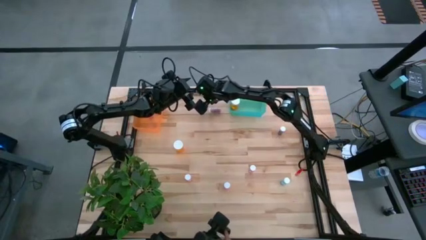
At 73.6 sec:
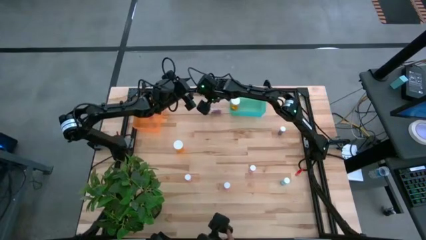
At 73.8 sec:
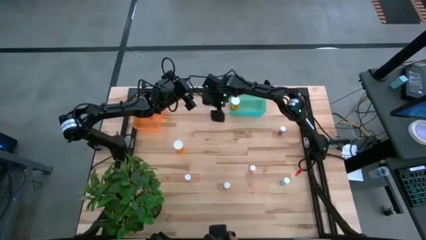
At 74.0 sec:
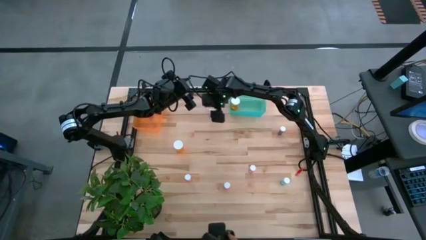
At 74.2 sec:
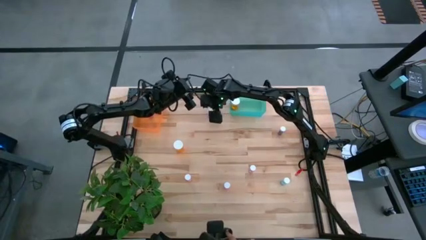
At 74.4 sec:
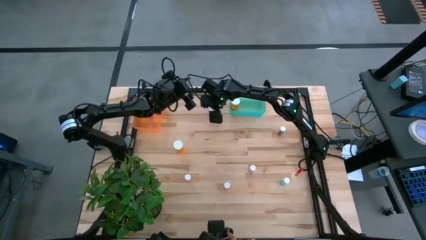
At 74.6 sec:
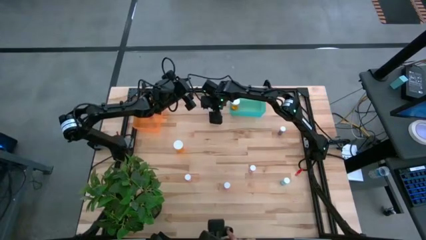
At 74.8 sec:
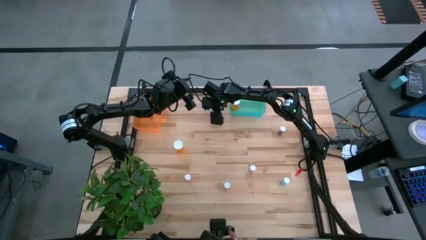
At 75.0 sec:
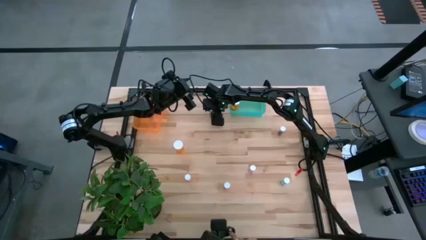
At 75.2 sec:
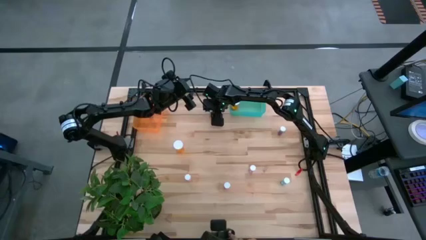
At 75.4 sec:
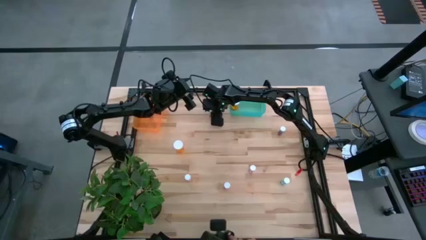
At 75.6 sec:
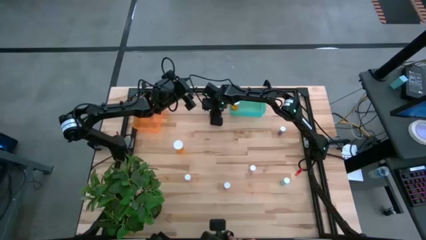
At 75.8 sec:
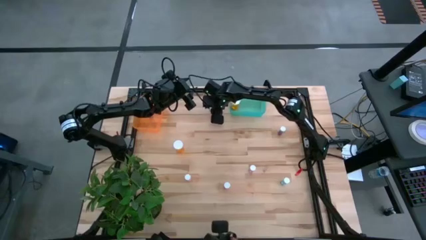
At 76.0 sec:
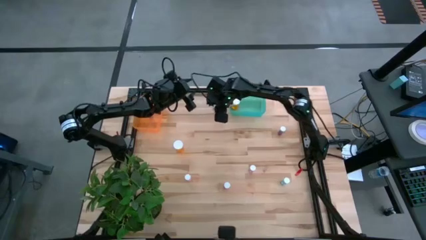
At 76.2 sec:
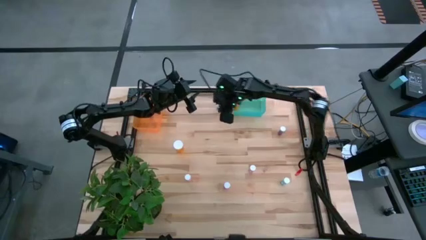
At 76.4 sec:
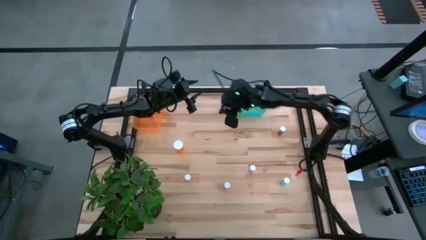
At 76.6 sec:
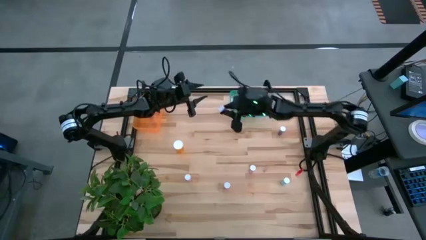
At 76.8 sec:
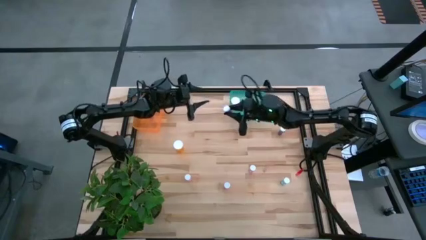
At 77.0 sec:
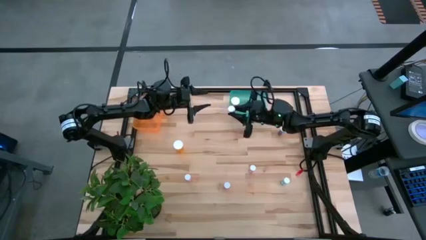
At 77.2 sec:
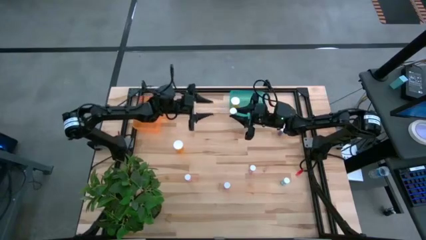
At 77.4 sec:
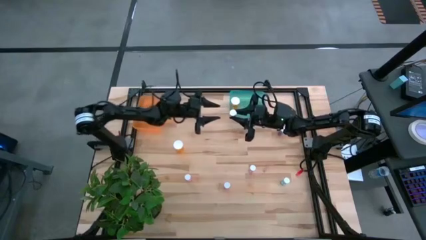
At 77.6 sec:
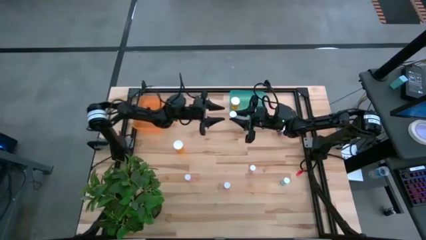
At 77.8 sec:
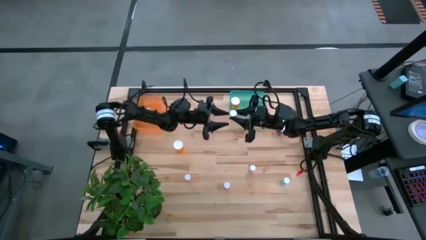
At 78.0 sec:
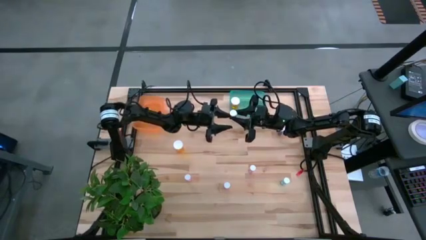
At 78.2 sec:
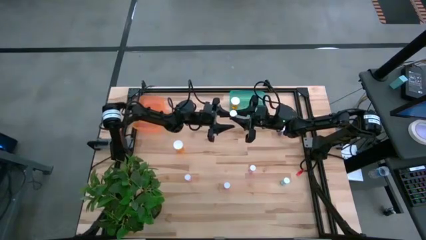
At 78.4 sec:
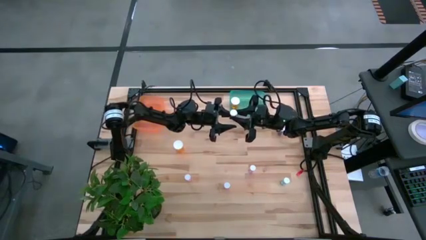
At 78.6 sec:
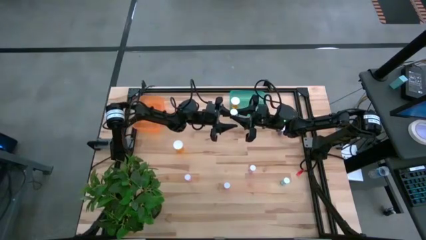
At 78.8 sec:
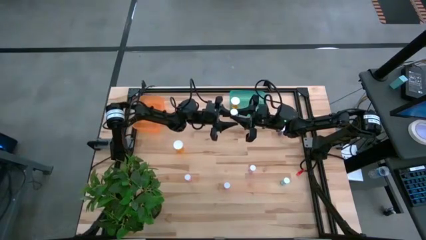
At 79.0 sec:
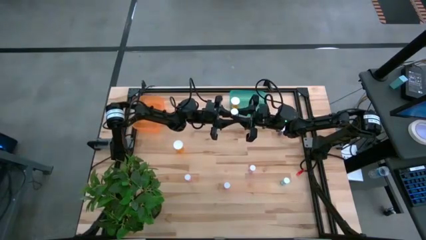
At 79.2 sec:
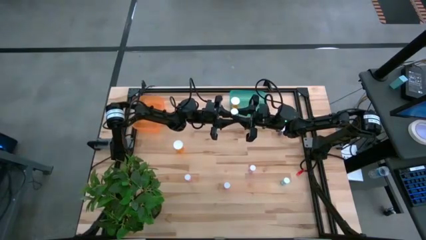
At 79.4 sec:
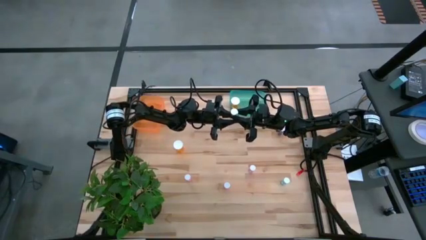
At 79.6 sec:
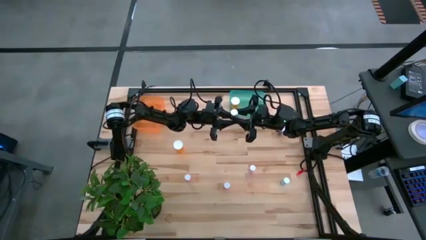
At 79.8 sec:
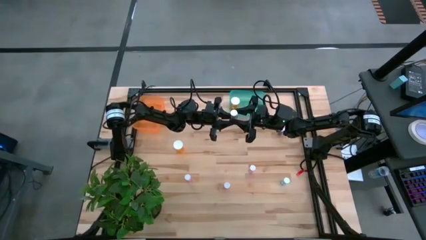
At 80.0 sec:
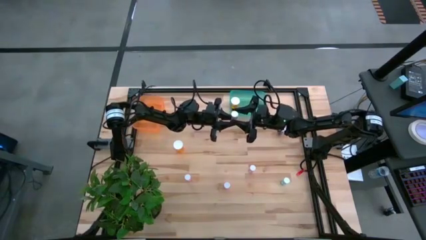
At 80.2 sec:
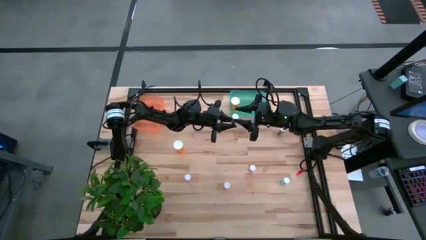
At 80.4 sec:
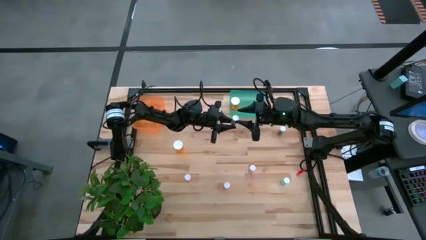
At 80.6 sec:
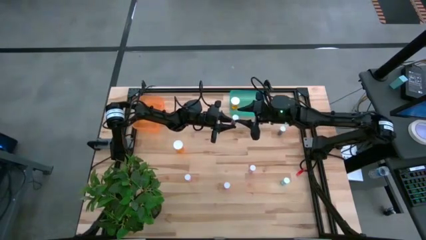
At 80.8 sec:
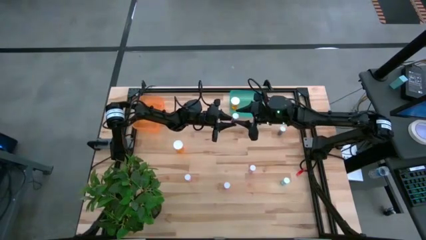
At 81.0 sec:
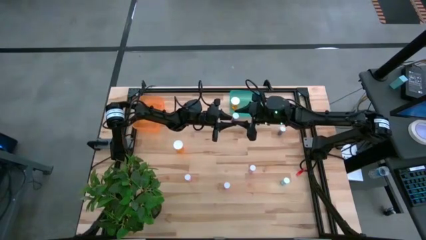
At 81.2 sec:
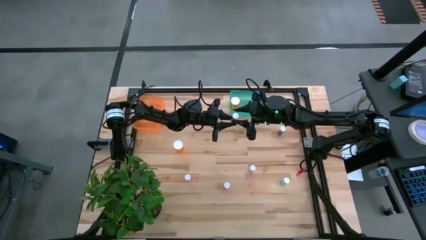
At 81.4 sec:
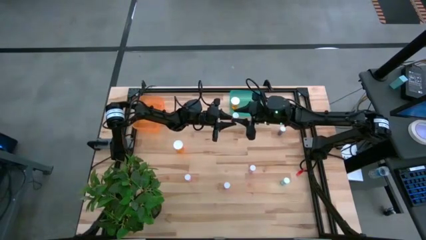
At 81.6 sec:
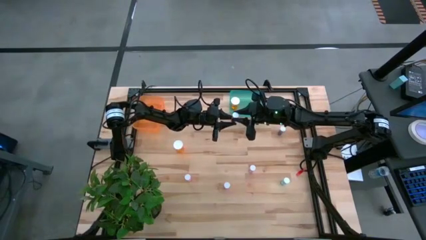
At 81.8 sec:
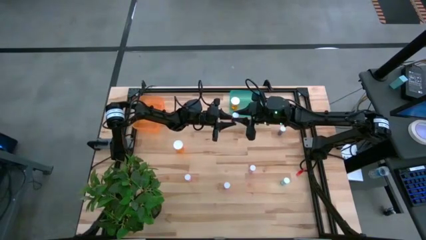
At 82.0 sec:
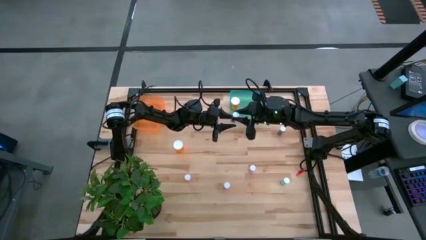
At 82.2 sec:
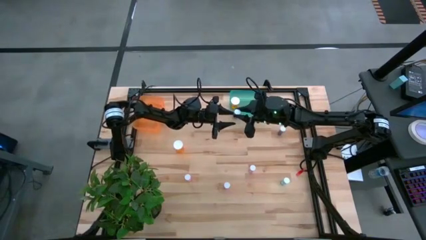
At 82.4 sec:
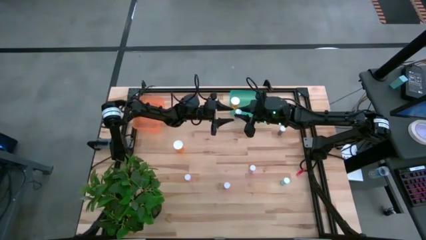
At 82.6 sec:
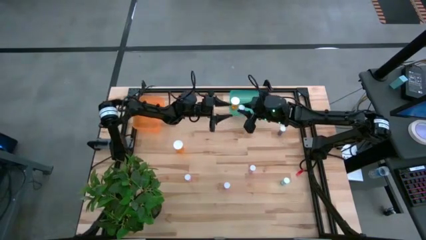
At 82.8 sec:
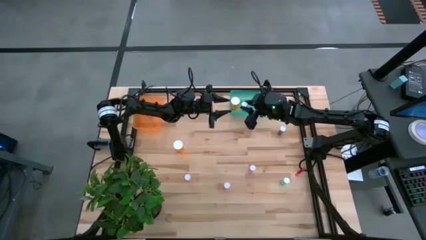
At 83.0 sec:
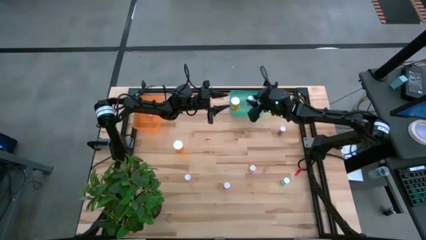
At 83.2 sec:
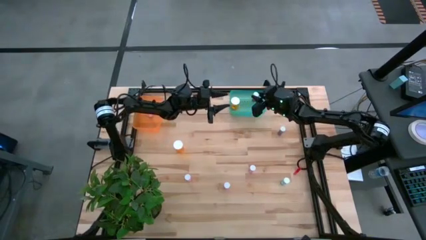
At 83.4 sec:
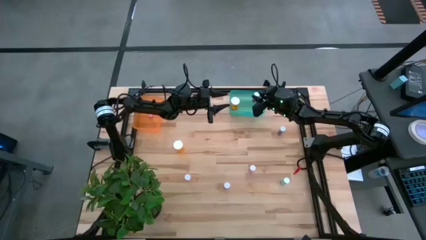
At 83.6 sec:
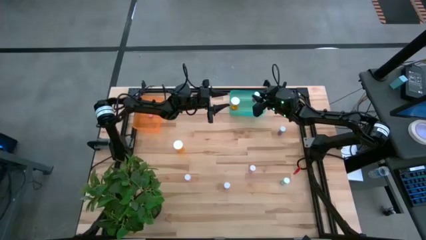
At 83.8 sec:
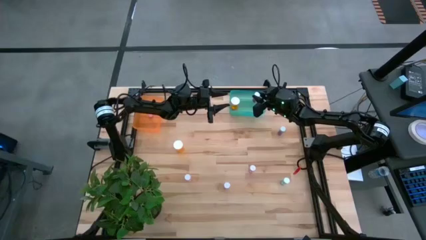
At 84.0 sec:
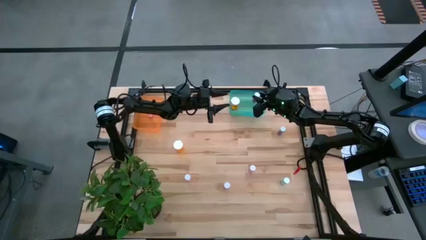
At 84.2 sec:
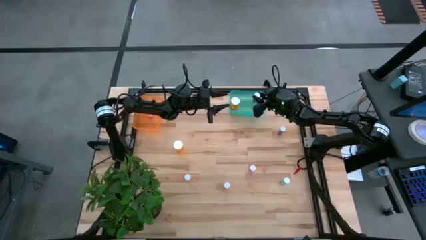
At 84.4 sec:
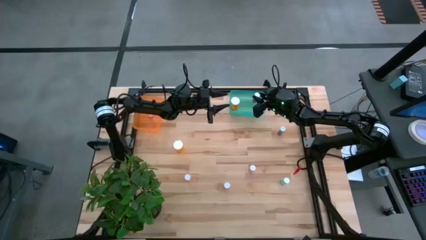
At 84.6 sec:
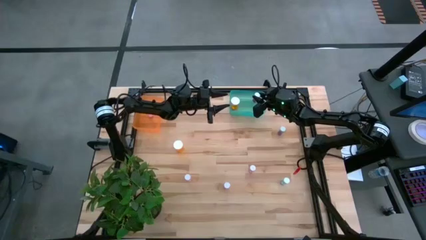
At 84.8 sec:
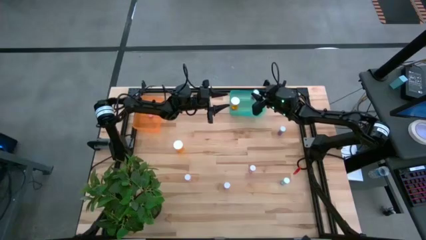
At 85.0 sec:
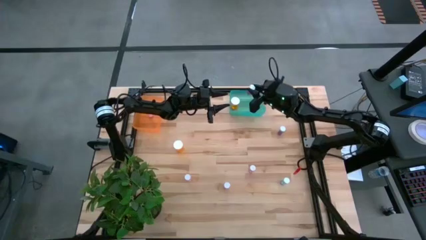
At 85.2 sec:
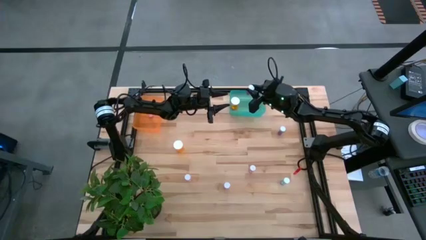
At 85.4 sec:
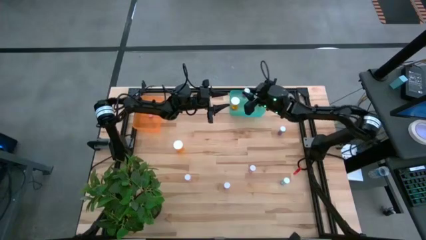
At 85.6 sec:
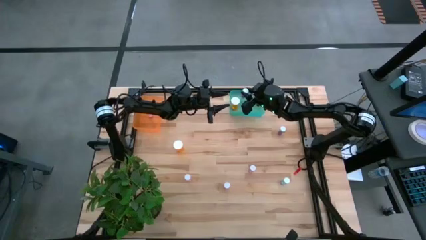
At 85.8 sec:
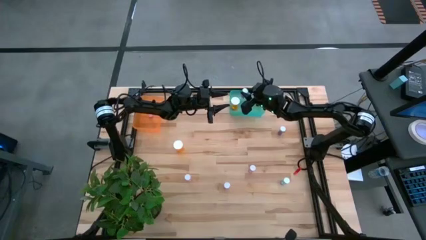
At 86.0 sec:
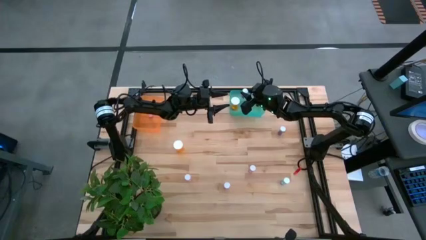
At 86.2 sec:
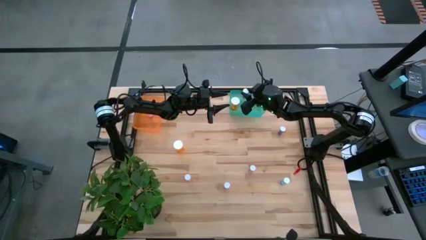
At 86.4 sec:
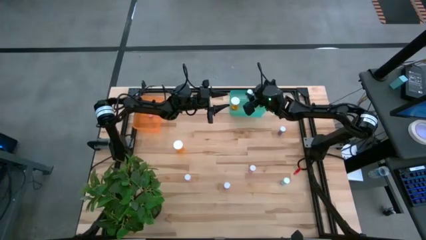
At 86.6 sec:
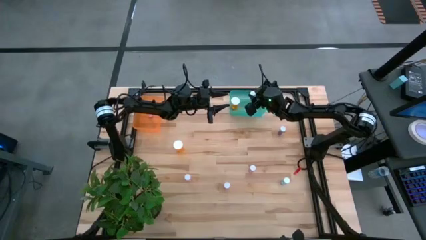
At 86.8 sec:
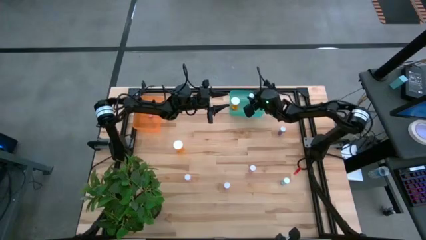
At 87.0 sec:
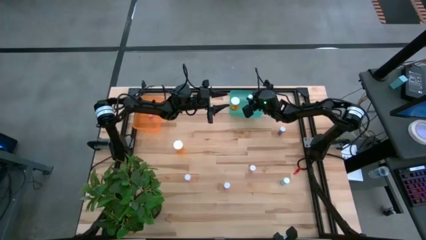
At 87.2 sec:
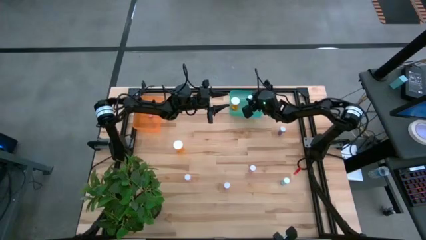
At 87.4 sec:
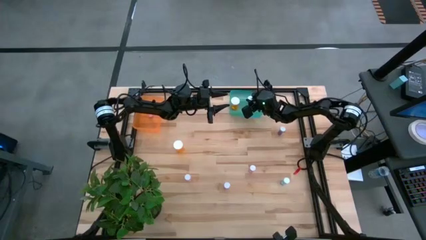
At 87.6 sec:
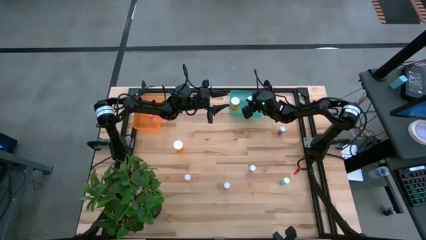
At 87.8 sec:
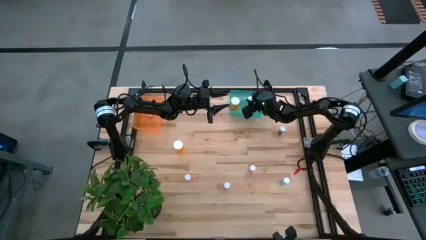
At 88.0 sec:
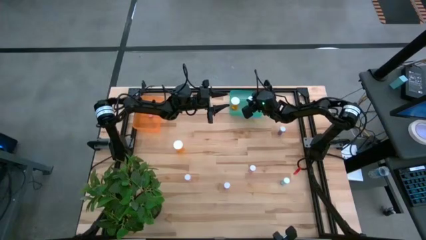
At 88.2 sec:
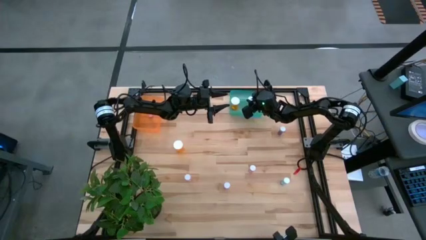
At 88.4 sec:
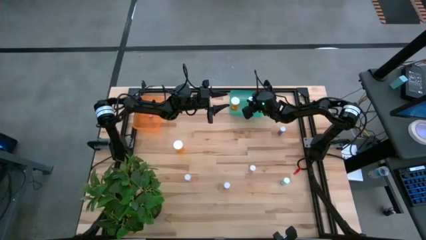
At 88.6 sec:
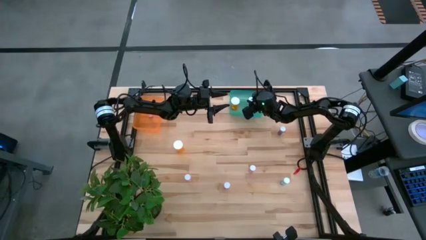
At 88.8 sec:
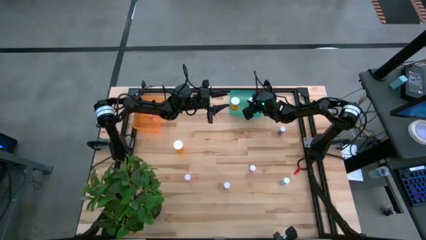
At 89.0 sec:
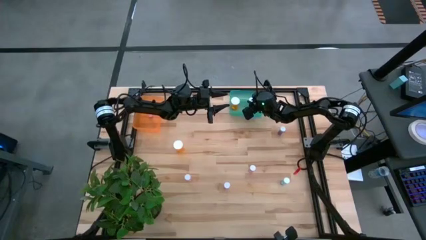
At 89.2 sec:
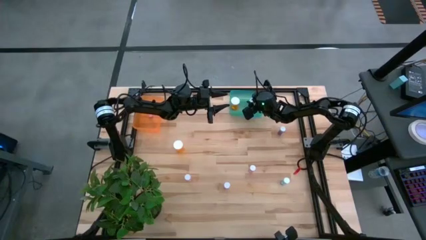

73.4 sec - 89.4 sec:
Task: Pick and place medicine bottles into bin by pill shape (circle, oval)
Put the blue capsule bottle into the green bin
